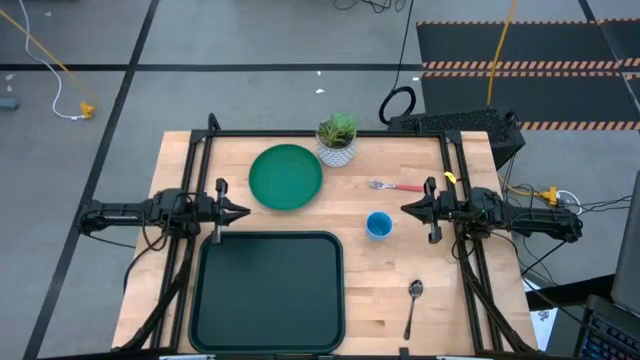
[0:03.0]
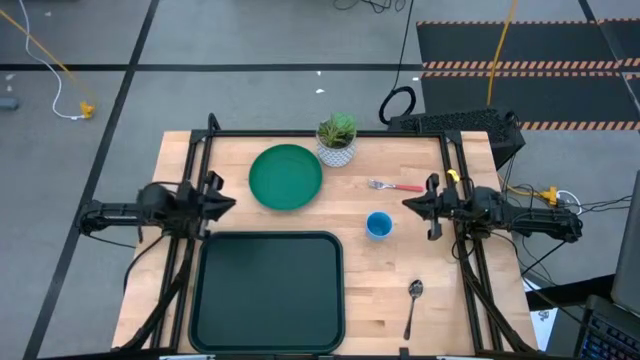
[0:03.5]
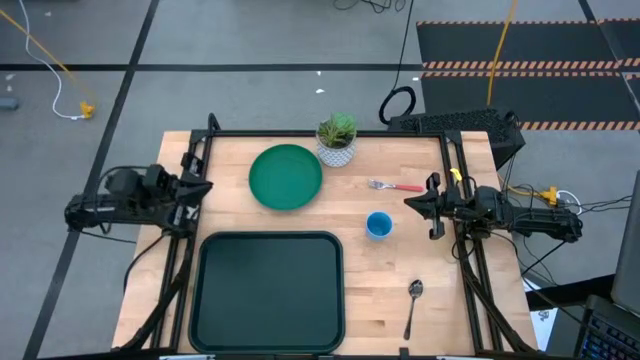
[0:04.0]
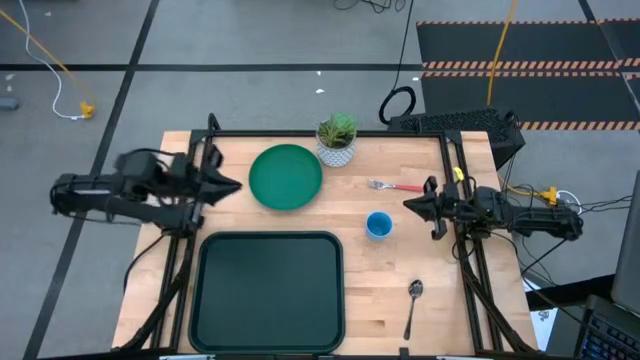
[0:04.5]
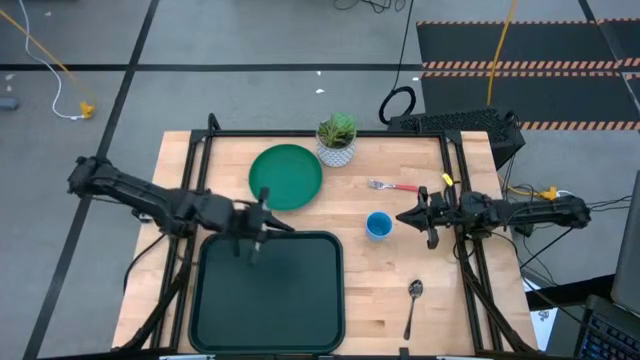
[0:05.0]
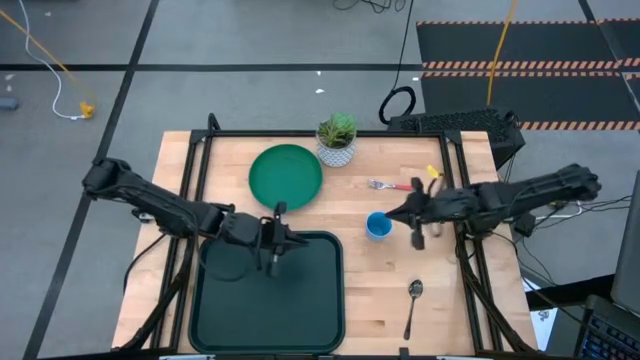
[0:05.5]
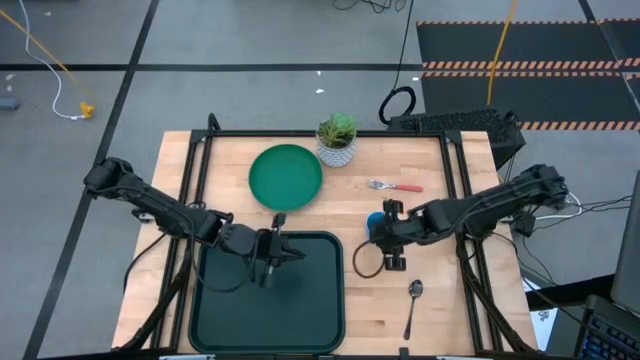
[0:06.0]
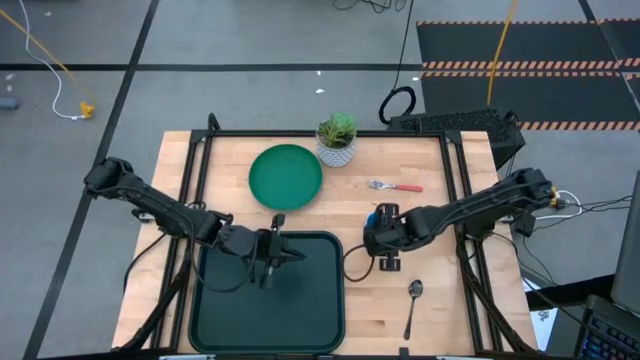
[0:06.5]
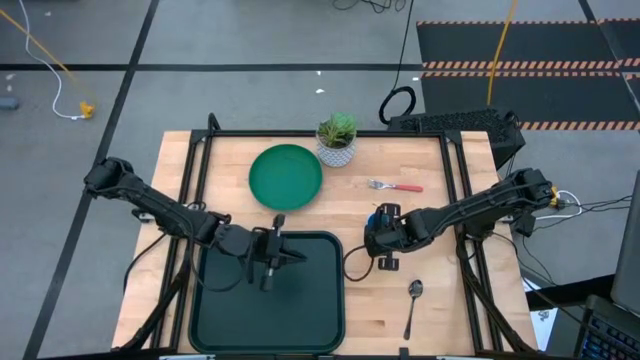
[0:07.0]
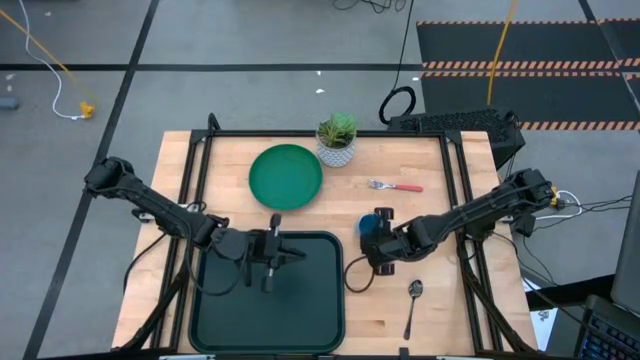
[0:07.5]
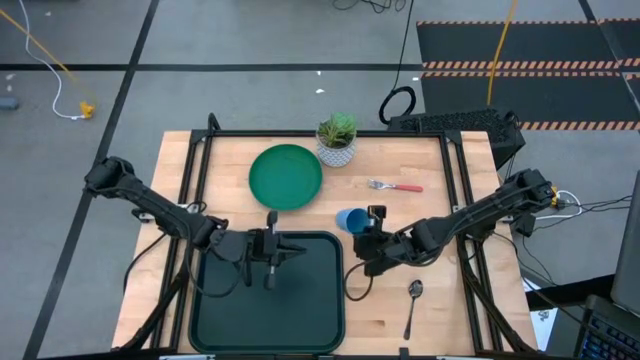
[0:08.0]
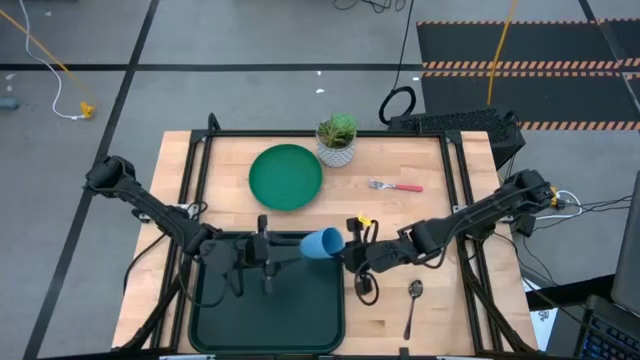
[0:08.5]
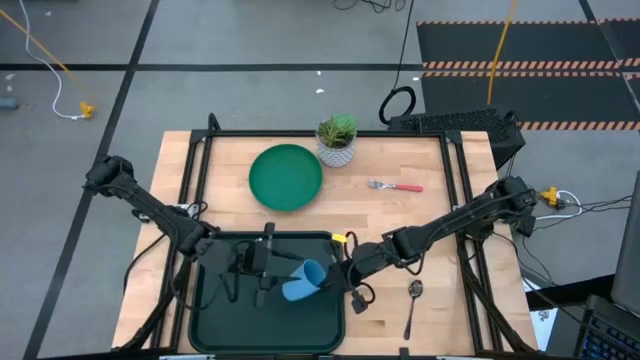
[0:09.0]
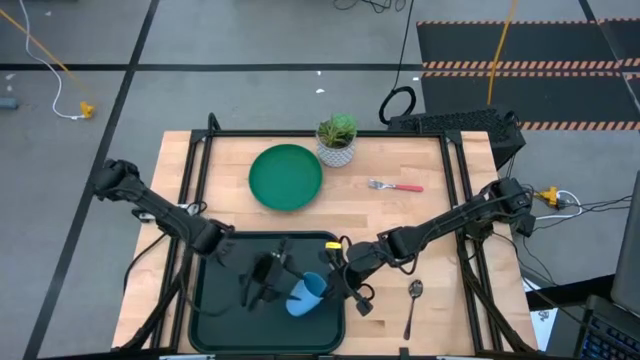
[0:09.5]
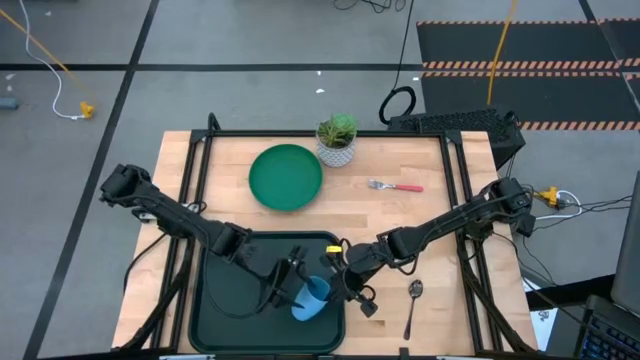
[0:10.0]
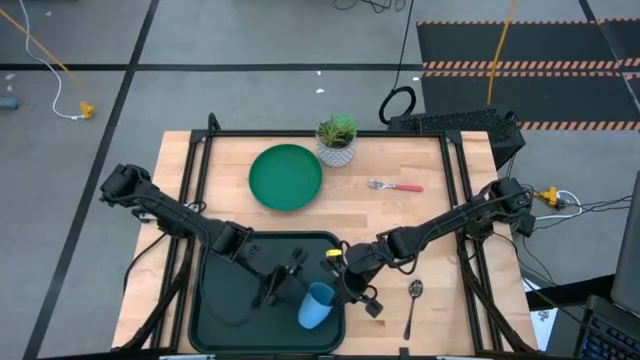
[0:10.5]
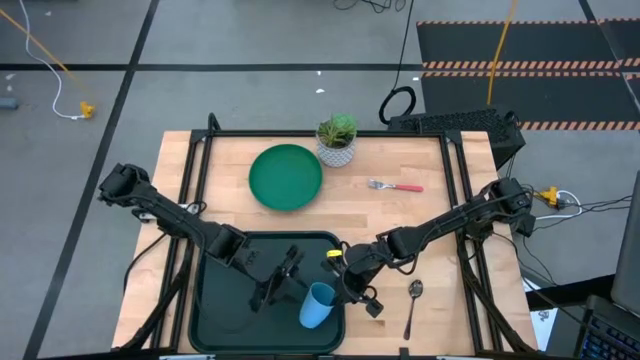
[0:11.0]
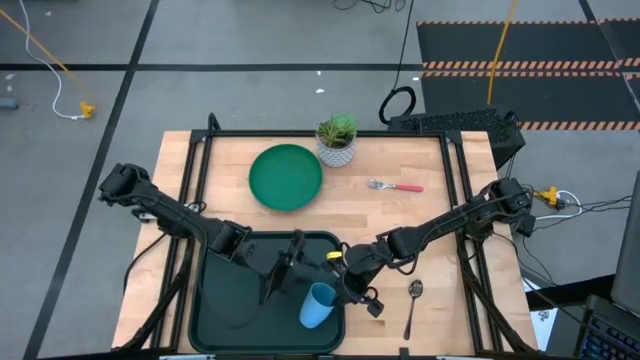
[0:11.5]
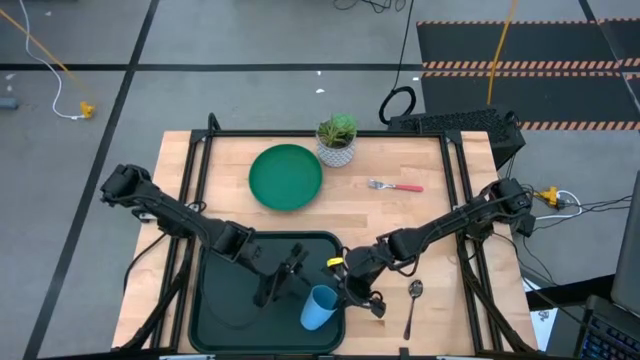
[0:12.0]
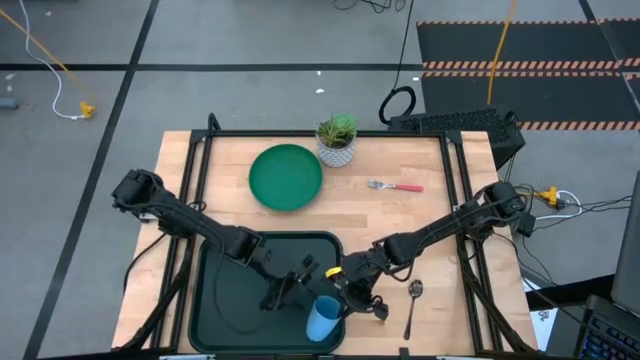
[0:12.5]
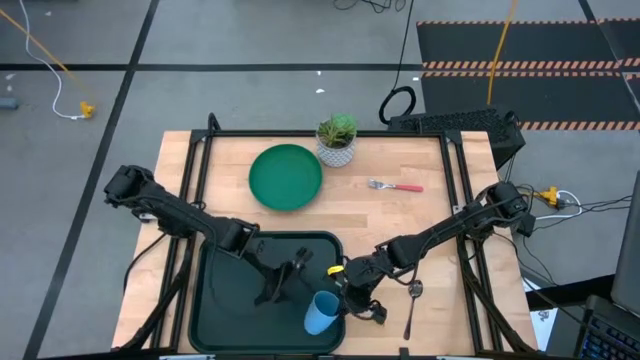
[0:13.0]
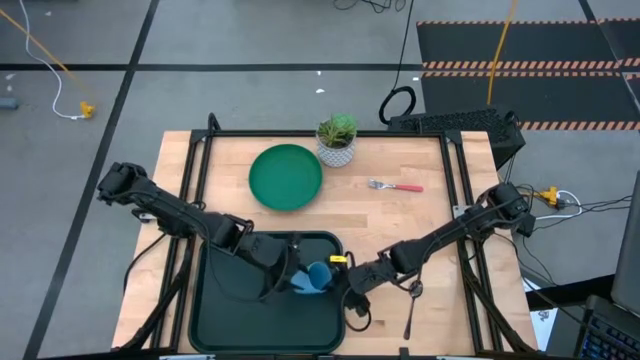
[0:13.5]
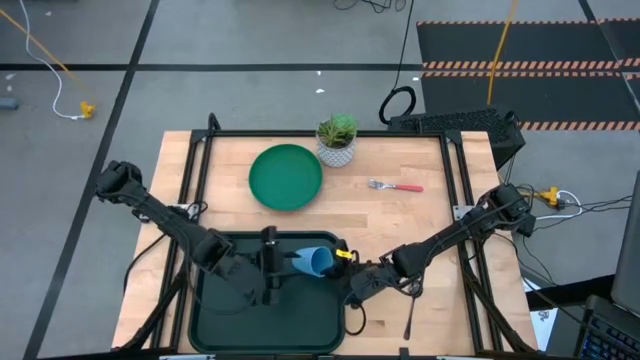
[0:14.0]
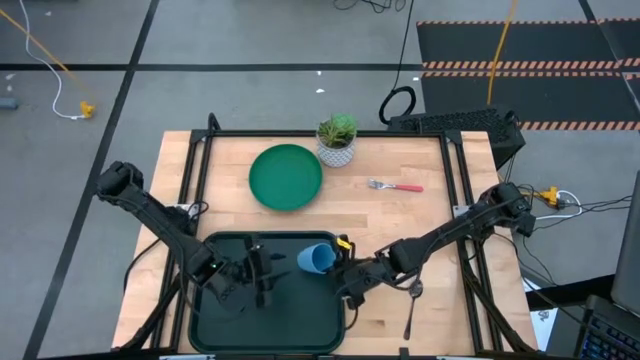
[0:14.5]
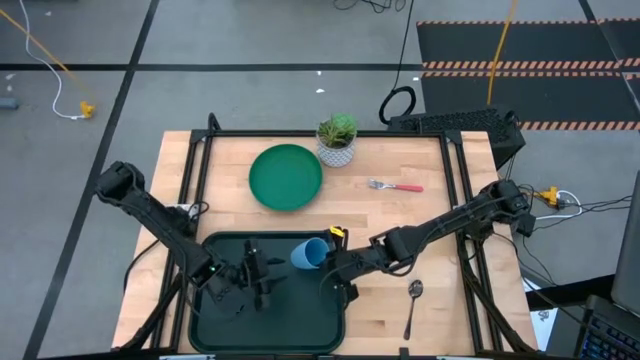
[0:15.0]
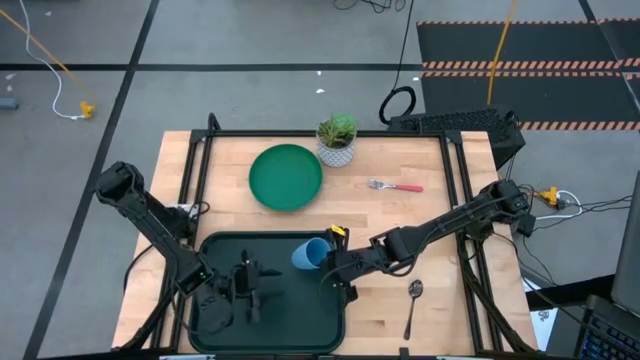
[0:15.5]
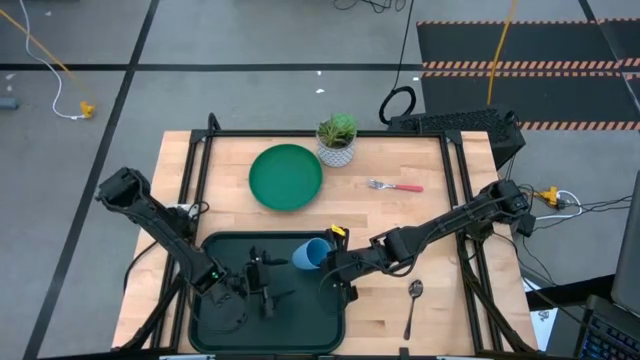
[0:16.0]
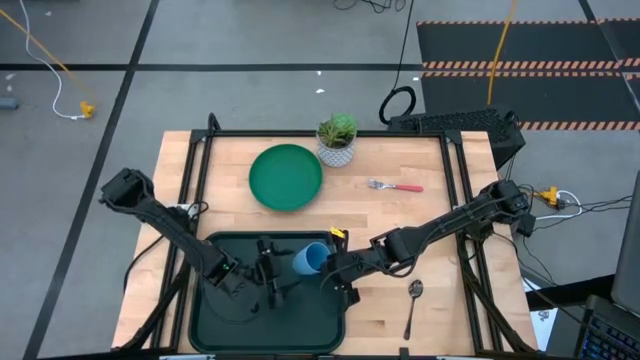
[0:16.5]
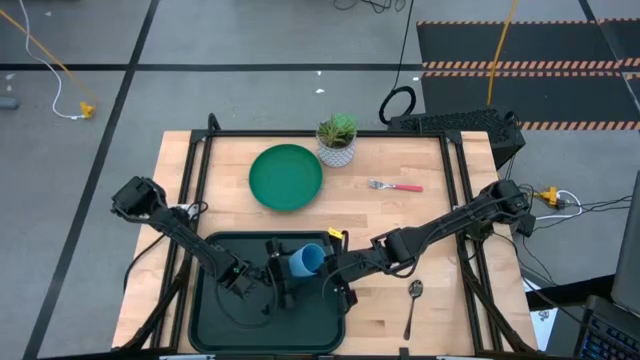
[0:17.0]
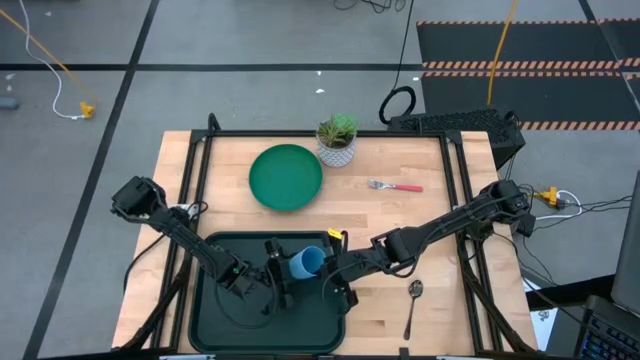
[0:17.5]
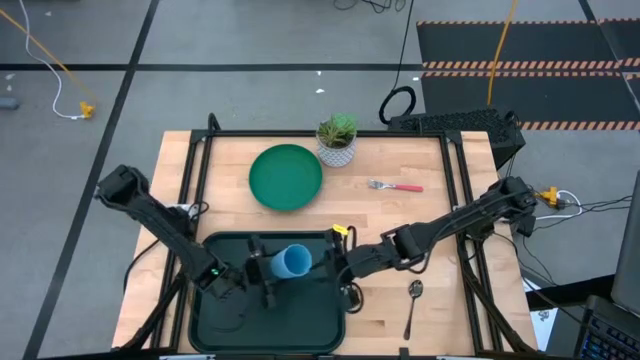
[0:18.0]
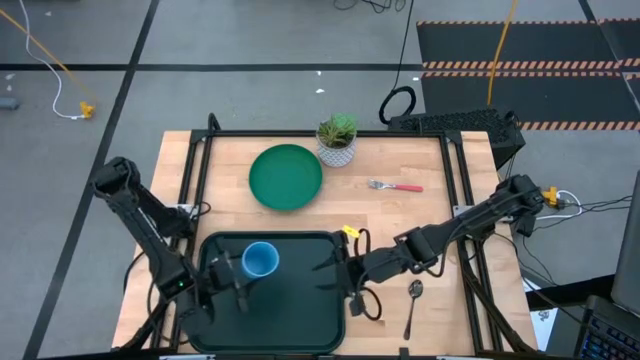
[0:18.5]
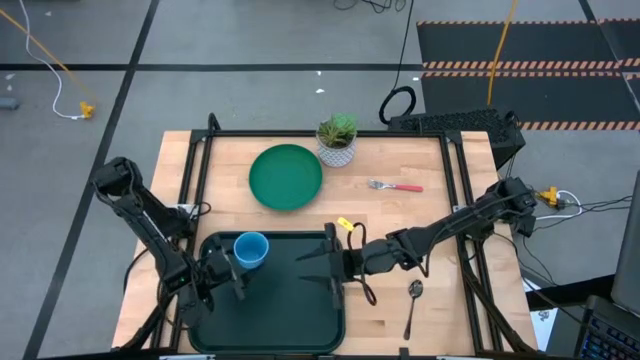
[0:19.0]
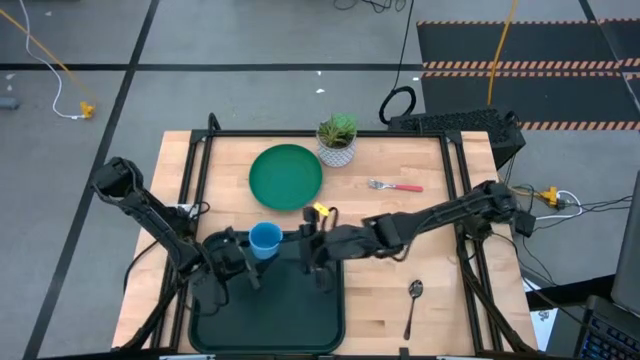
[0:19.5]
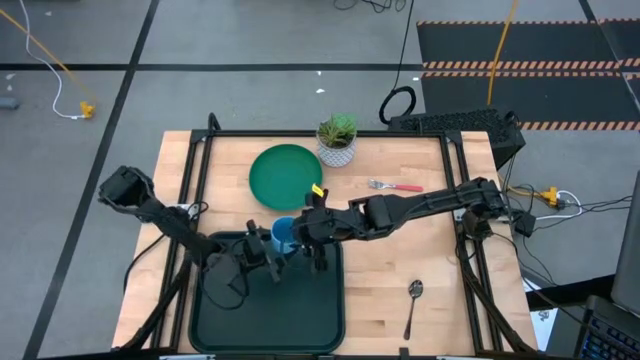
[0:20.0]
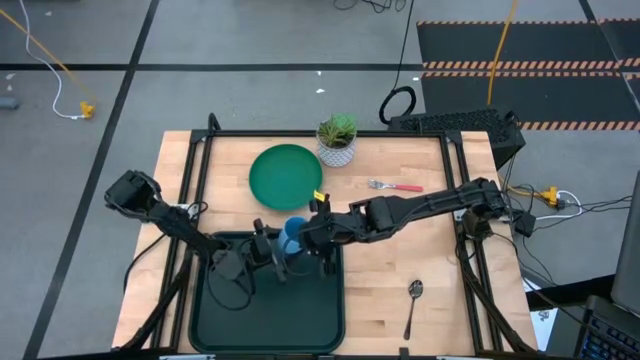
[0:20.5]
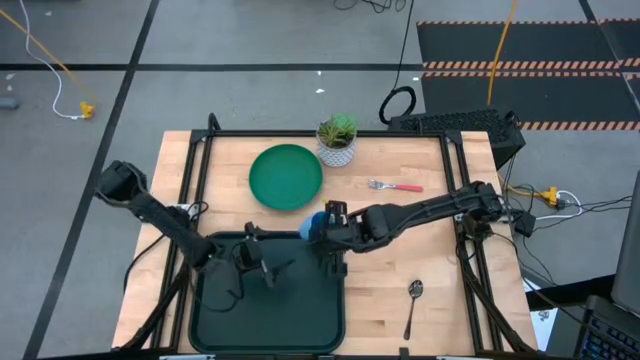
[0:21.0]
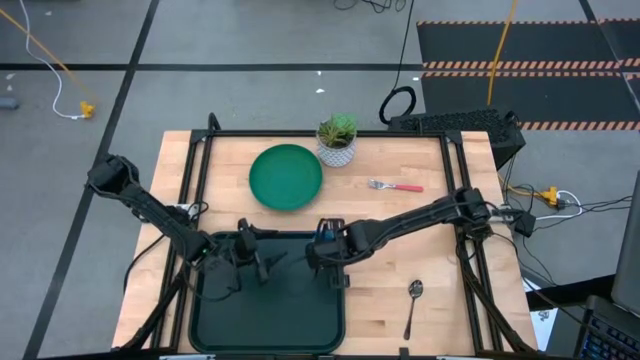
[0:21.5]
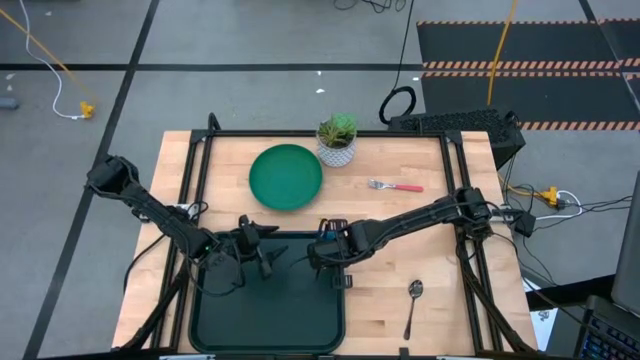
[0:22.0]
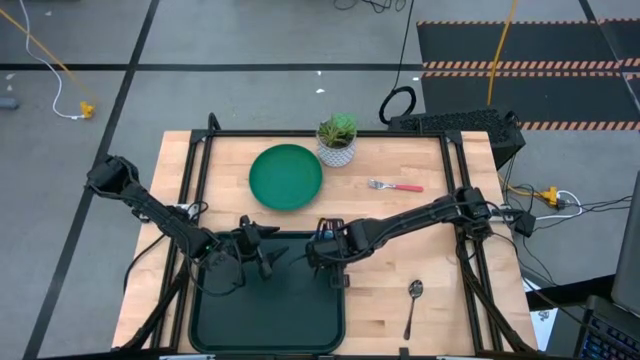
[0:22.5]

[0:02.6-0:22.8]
Task: Pick and place plate/cup/fork/spoon on tray
Put the blue cup on the top right of the black tray
